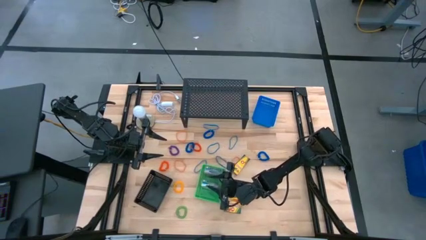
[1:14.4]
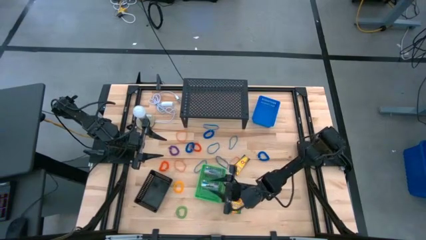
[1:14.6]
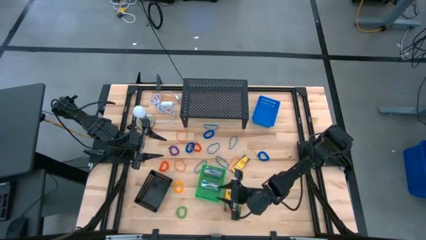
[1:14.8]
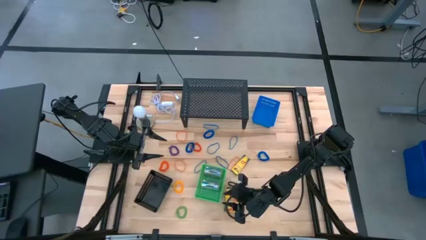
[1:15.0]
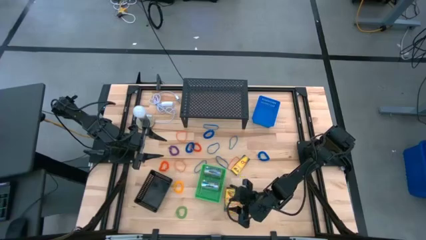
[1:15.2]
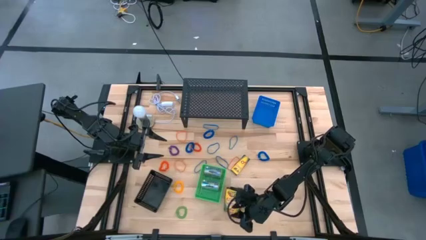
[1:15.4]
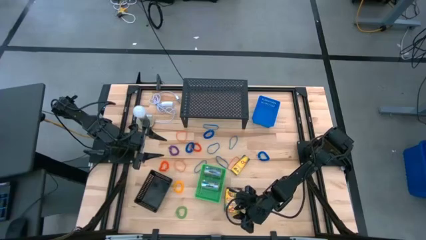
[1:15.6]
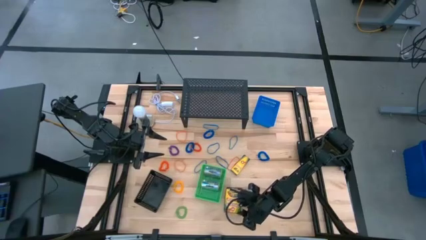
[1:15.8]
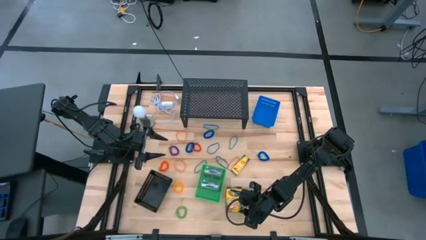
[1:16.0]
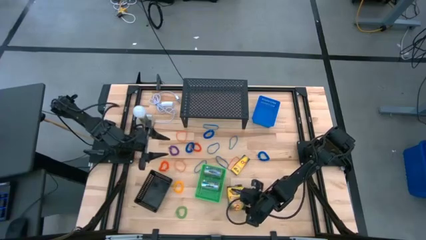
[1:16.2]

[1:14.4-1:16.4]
Task: Pick & Place Office Desk Supplies
Adjust the crayon box

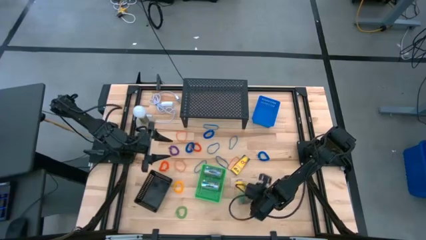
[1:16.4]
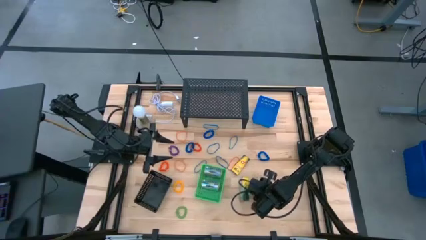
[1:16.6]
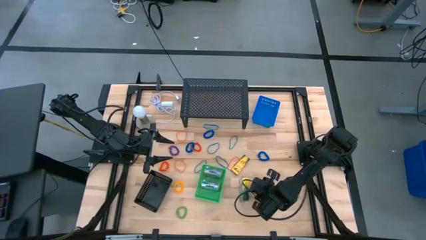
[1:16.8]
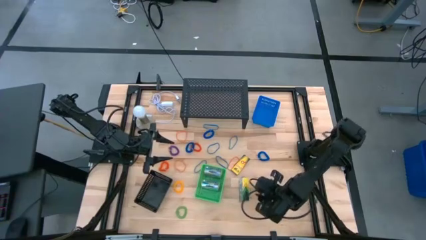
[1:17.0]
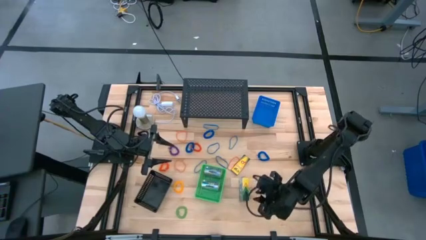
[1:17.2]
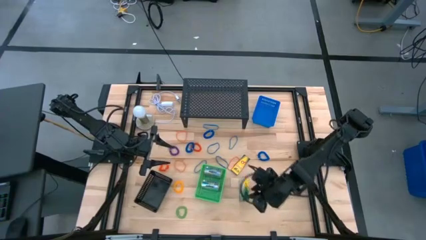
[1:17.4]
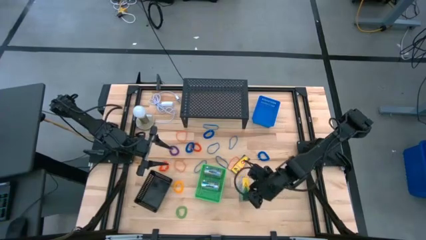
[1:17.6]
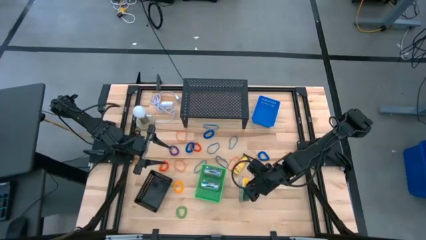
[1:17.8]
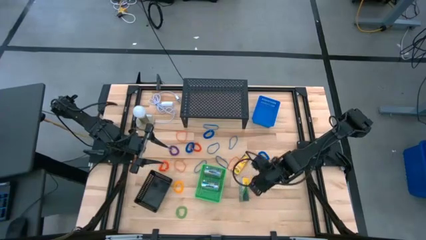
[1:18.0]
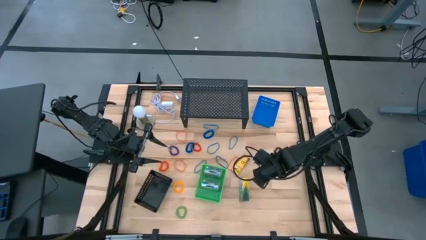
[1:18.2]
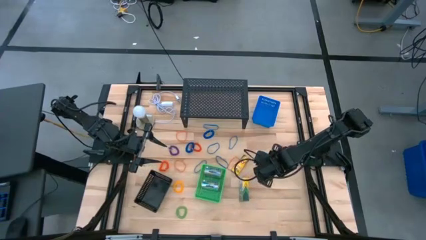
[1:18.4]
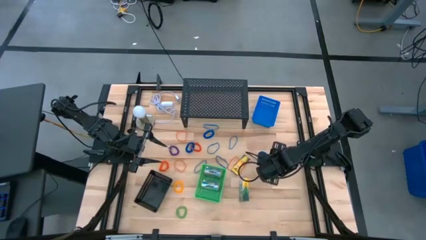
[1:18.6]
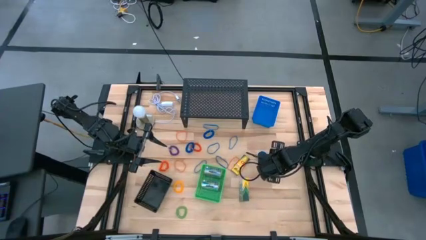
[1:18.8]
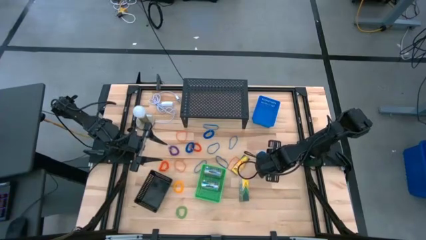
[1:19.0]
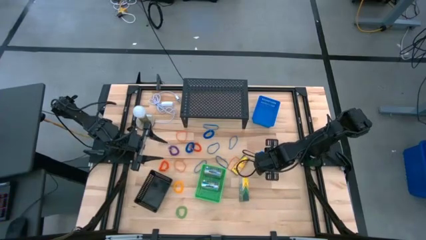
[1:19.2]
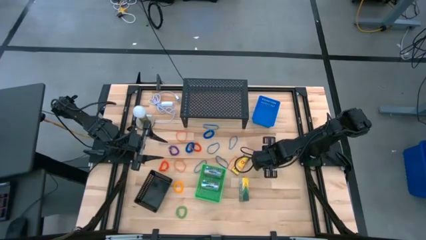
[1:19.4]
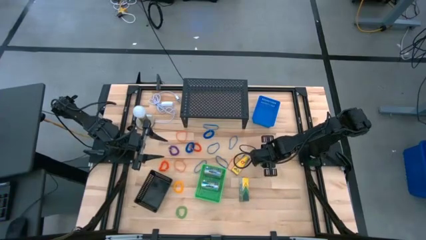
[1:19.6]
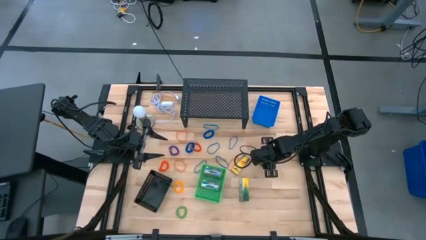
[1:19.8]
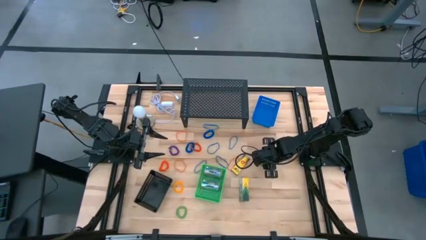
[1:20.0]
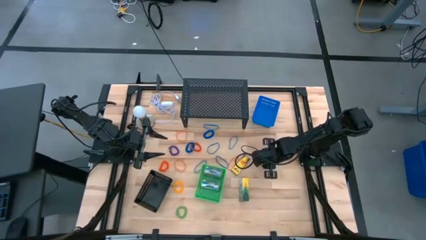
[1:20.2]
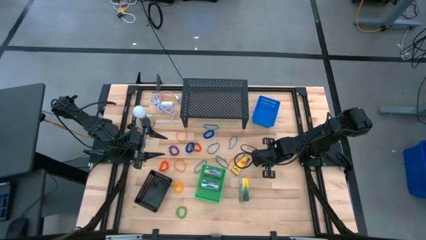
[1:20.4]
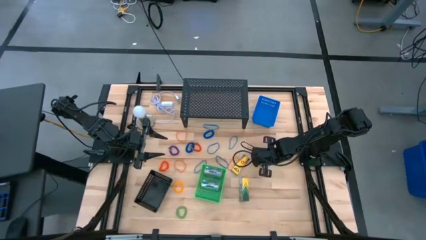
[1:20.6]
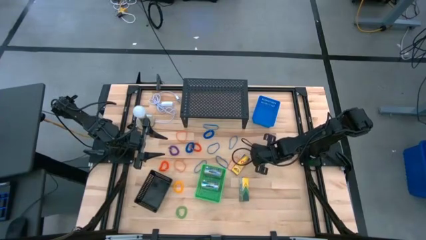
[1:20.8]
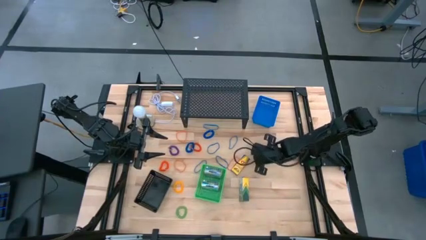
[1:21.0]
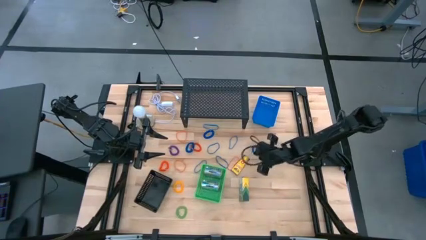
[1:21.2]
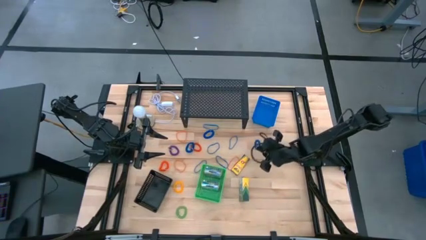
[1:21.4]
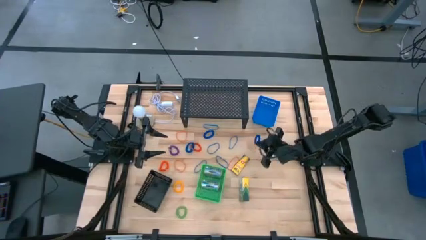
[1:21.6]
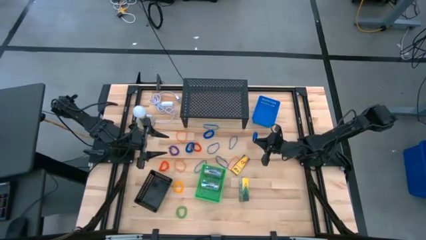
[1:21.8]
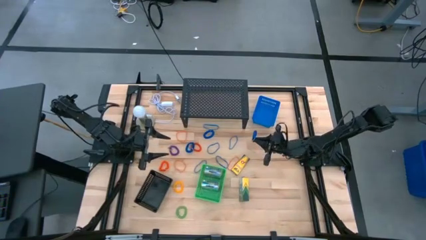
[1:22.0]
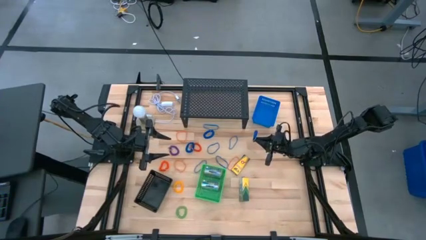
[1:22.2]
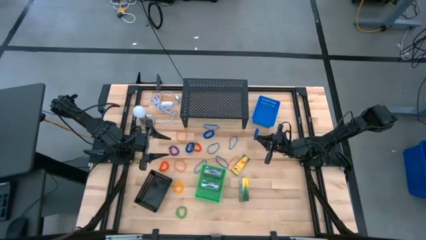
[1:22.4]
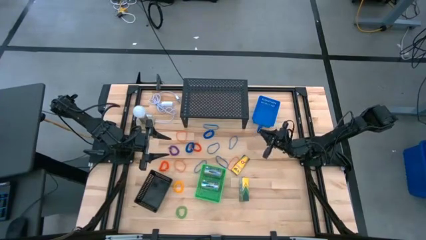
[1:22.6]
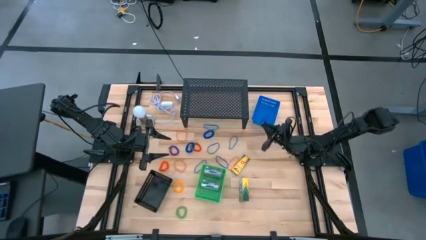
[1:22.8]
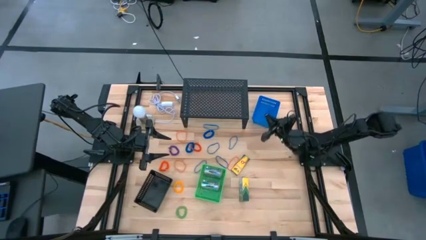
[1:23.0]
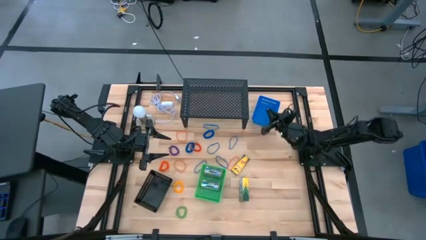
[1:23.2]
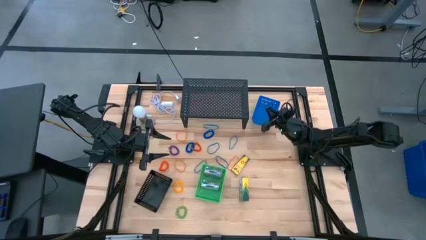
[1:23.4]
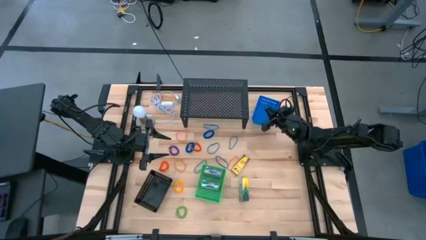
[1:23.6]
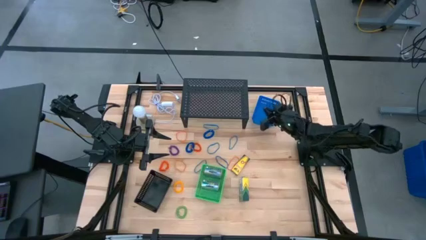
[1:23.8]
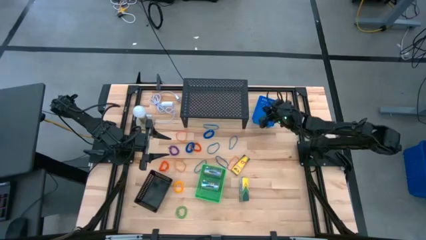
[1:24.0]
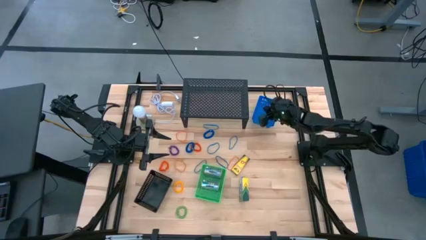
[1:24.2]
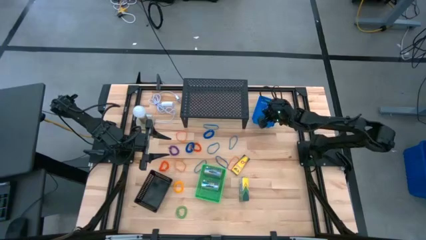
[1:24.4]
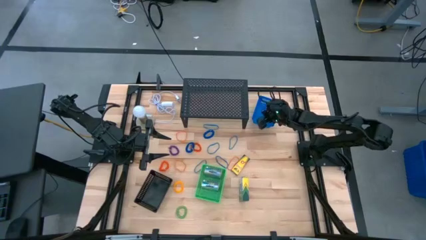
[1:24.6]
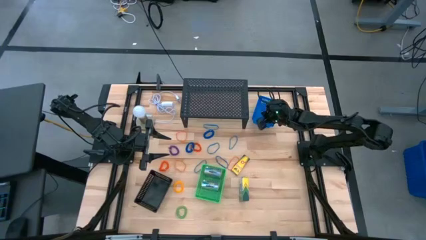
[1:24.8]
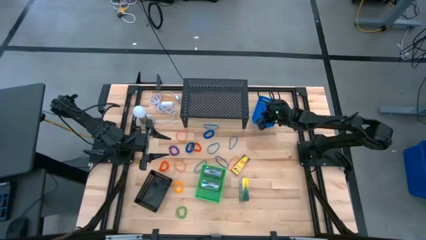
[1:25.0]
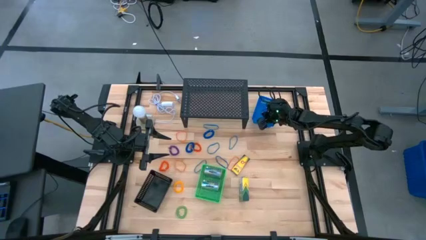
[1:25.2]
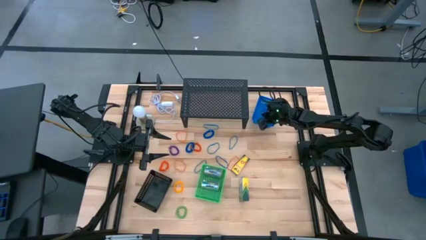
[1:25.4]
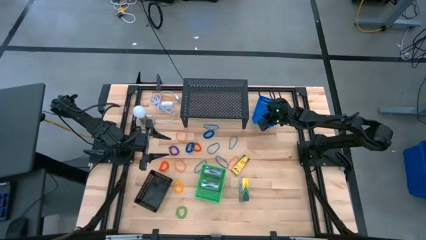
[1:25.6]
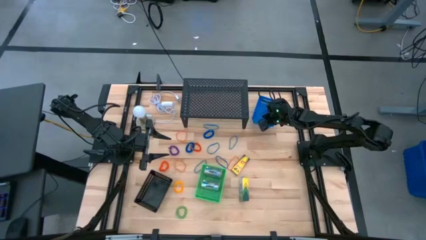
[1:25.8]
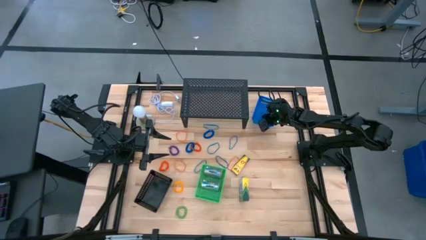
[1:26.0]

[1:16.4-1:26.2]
Put the blue spring keychain into the blue bin
